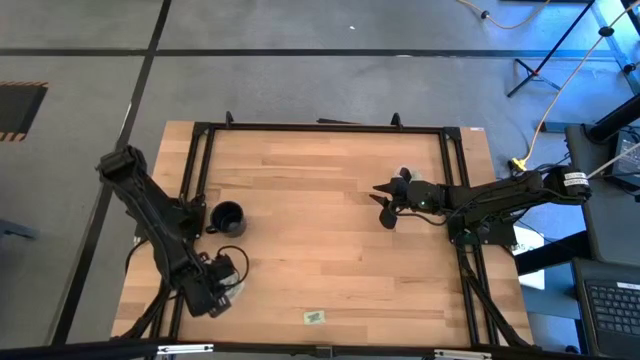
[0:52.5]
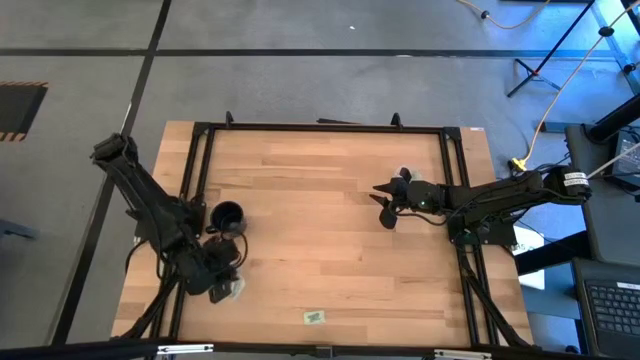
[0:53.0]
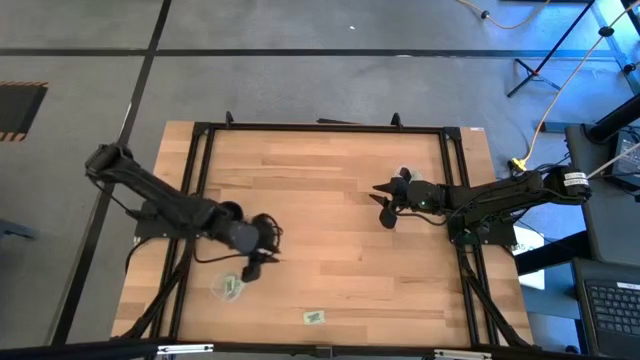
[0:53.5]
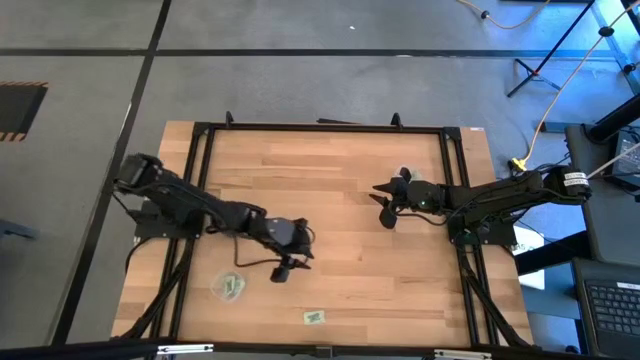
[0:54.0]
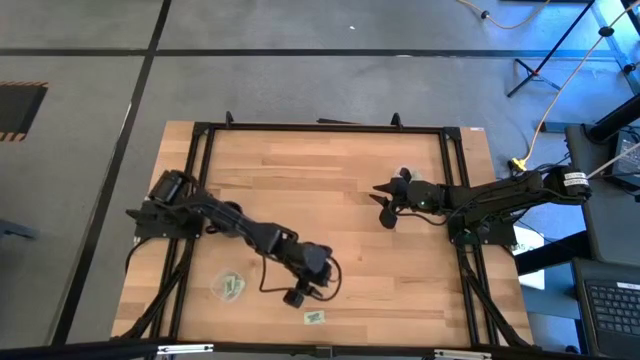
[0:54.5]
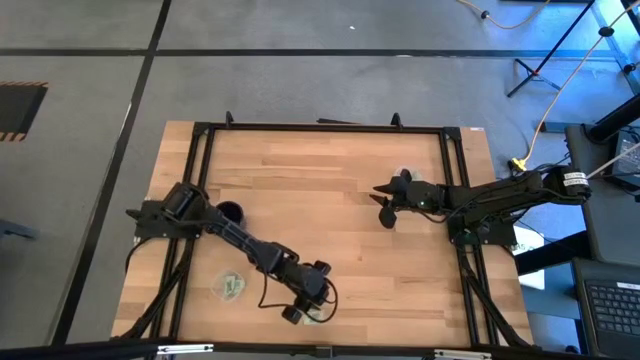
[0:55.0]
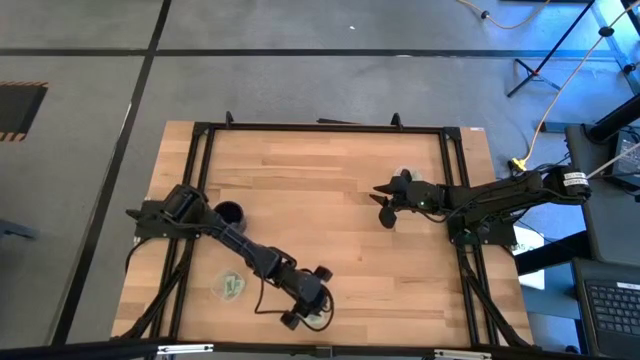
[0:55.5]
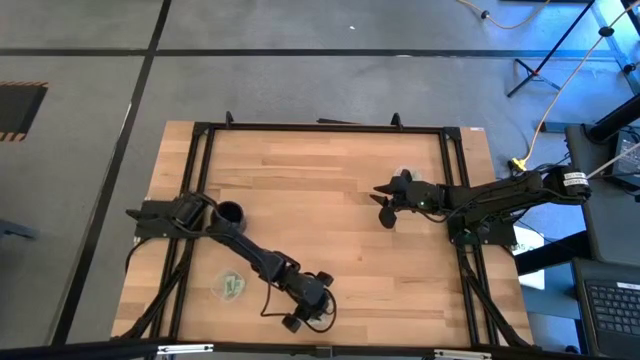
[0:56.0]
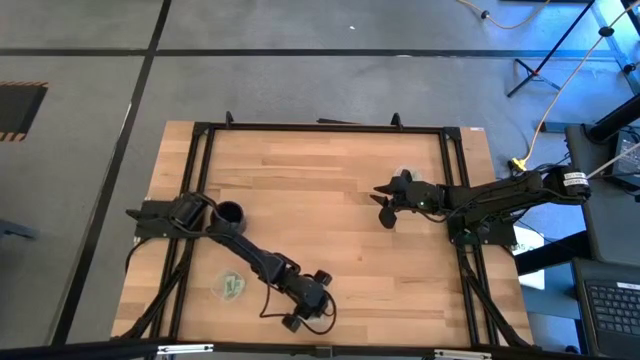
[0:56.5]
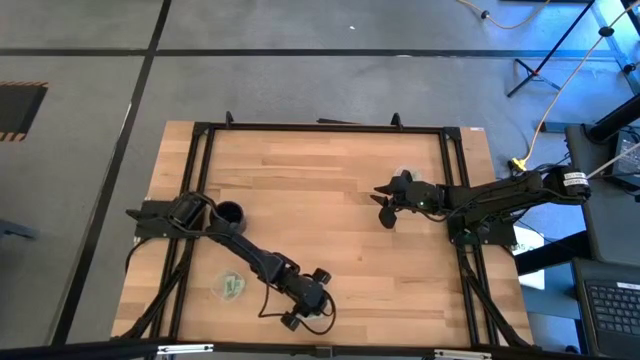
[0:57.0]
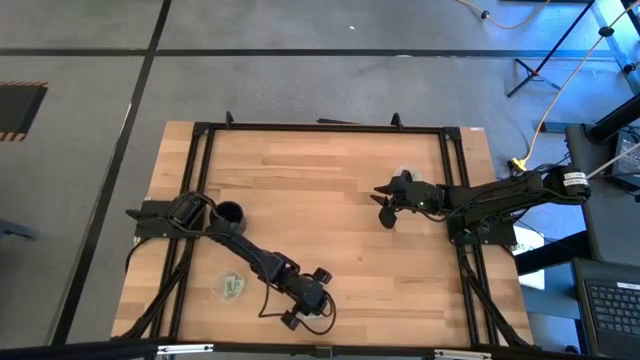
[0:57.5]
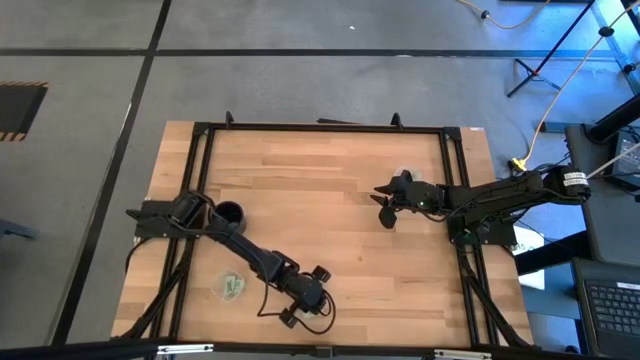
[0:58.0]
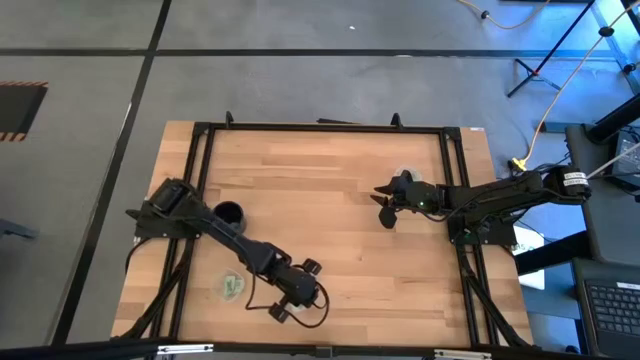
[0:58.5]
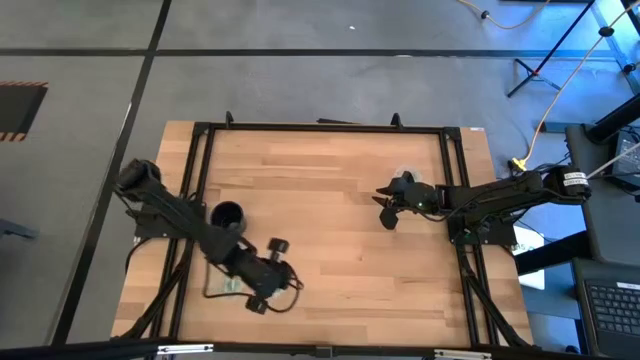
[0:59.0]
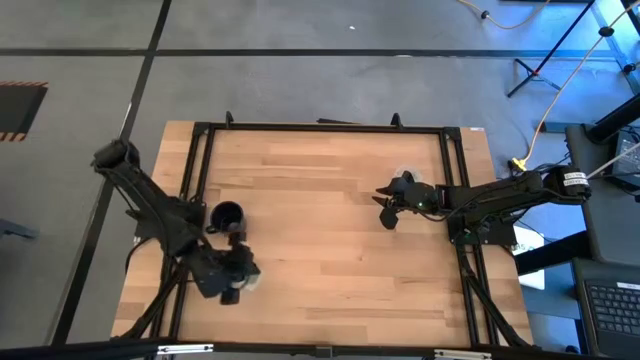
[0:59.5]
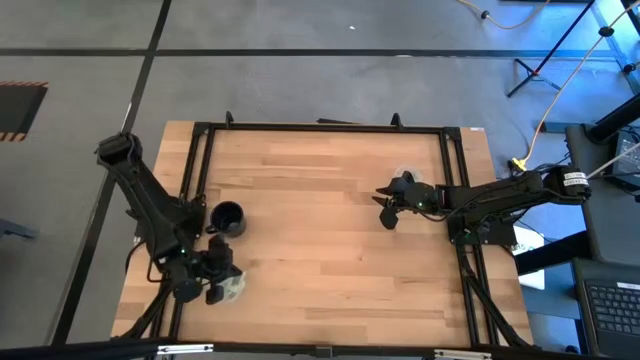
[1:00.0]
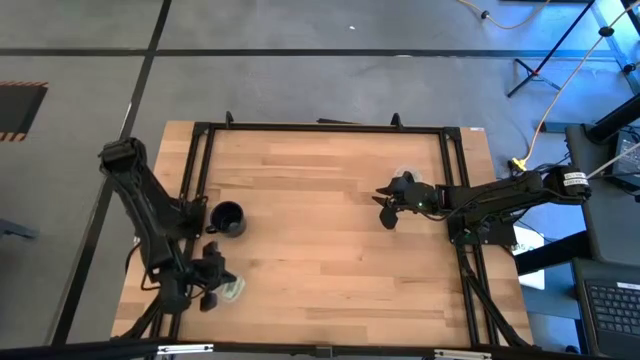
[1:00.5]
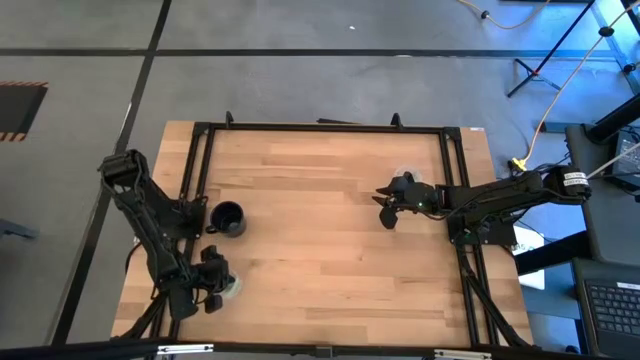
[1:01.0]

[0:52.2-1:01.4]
Task: Pick and place items into bin
Put the light green stevia packet into the bottom transparent bin

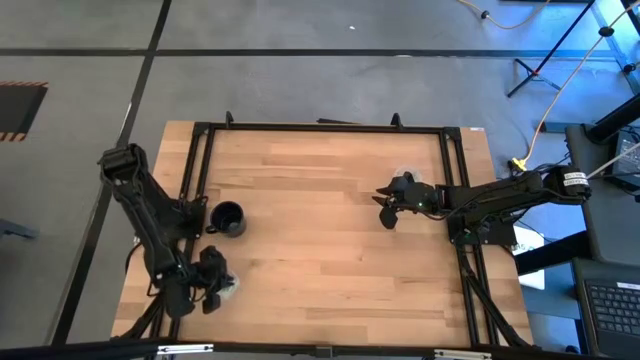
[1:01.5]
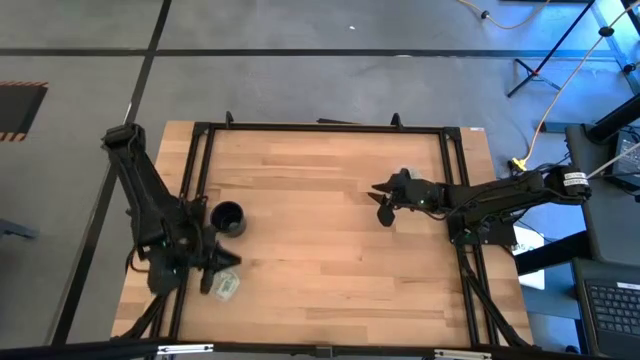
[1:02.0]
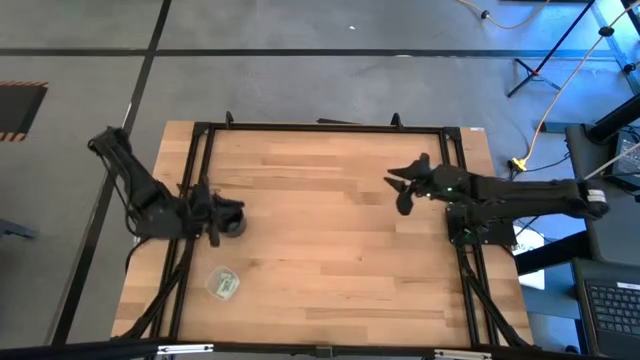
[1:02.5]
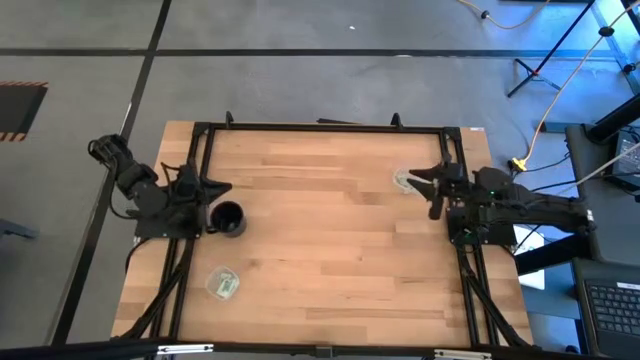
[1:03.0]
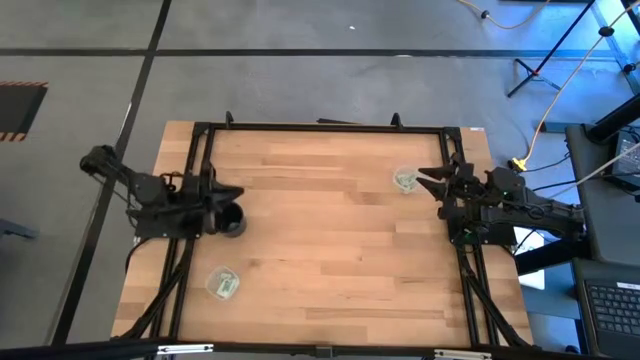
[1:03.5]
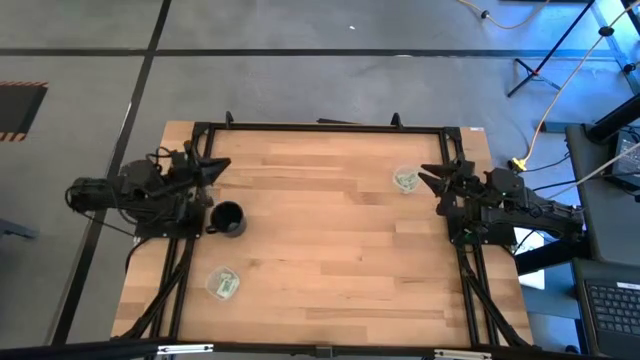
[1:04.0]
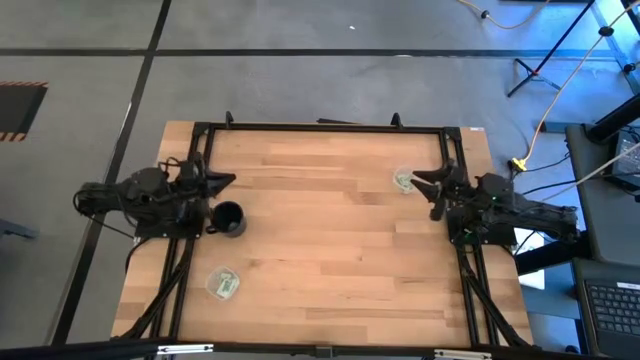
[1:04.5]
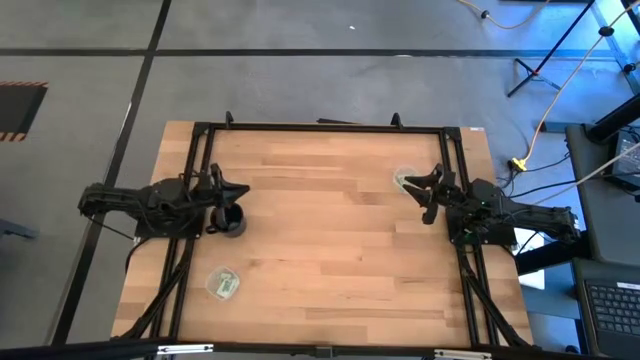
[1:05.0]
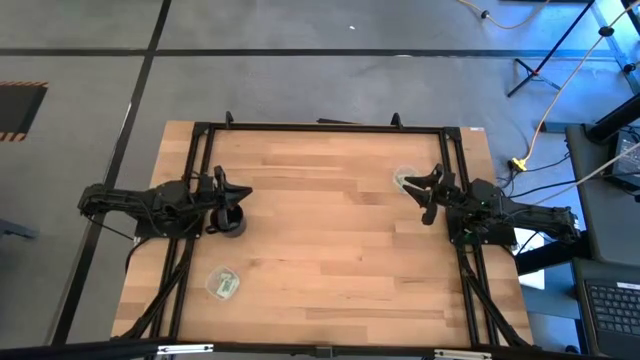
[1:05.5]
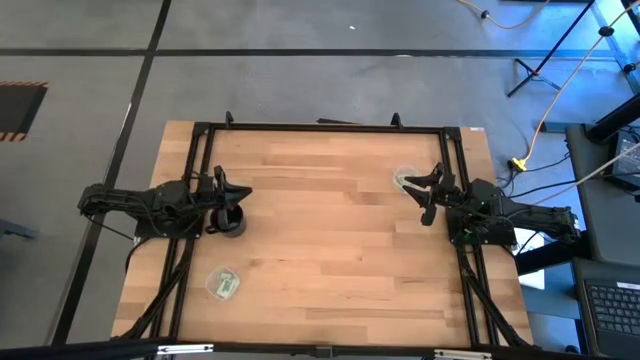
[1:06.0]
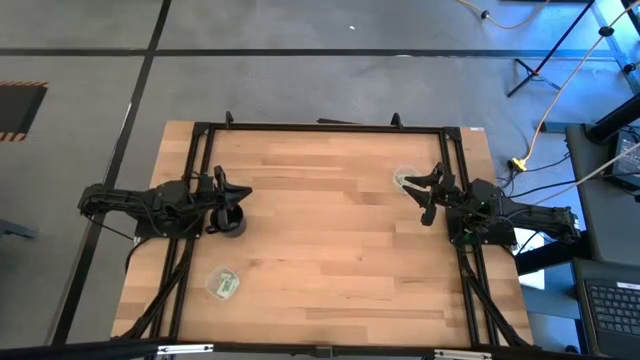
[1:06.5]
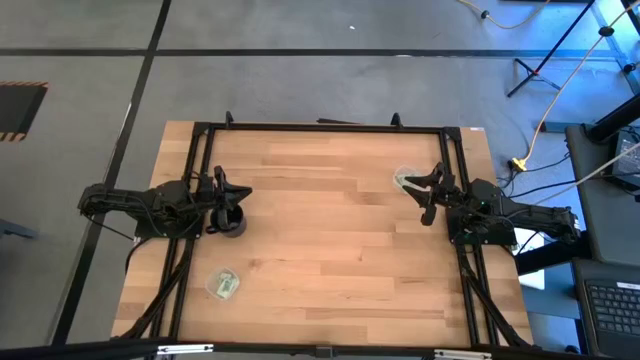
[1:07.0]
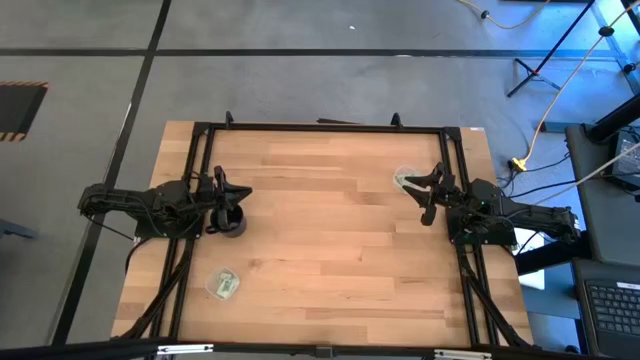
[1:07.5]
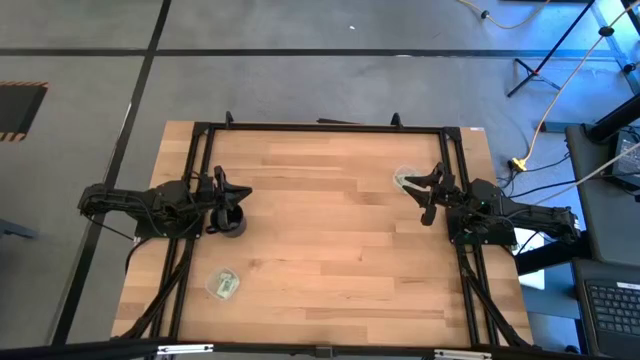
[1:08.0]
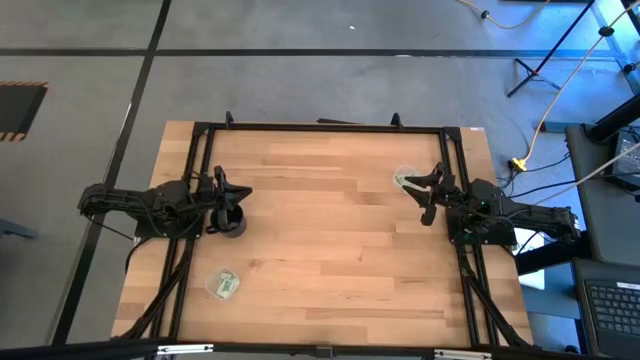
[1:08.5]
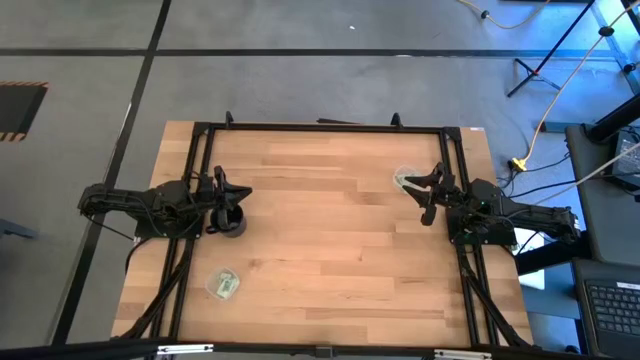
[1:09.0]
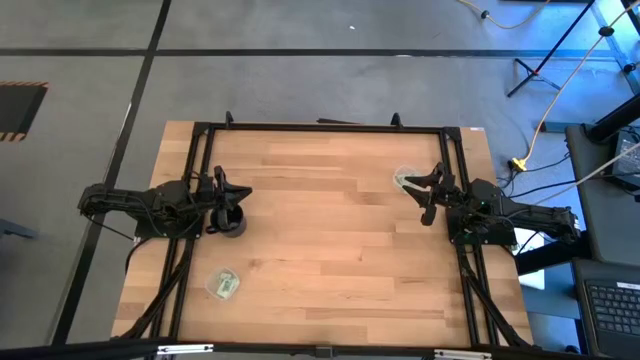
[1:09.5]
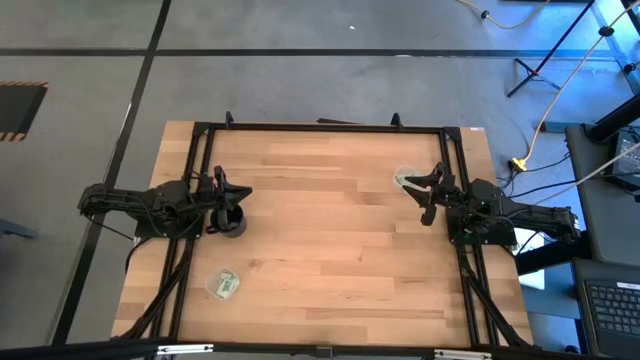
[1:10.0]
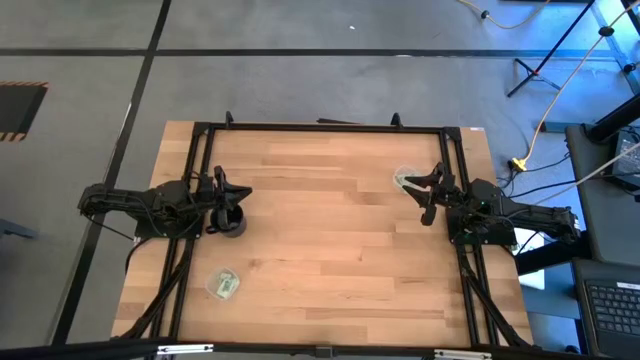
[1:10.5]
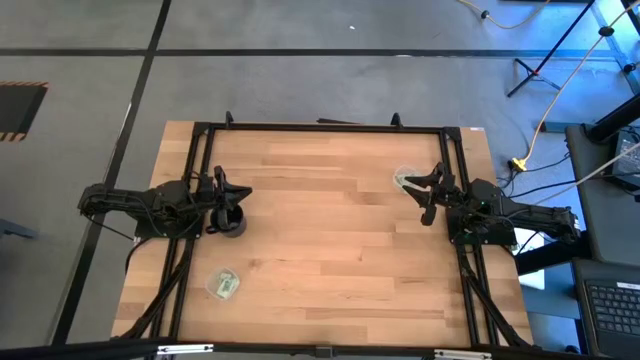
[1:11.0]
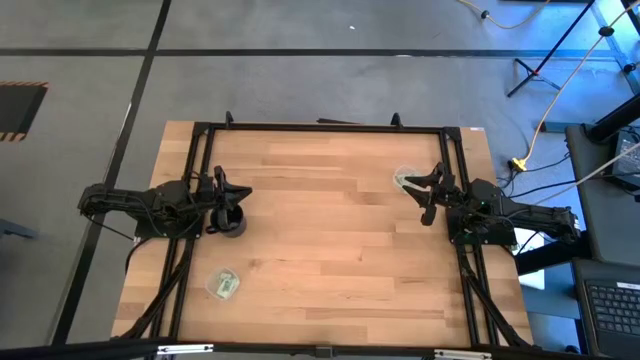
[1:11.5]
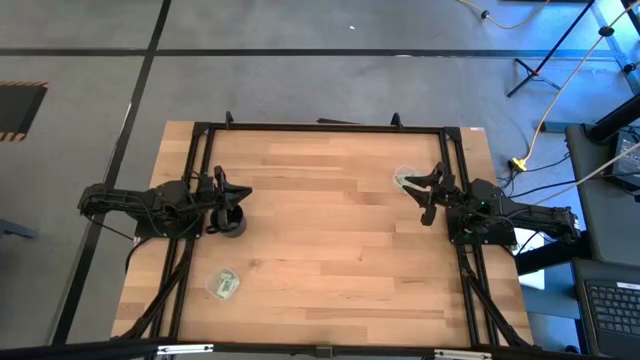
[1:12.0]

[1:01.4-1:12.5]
Return to Home Position

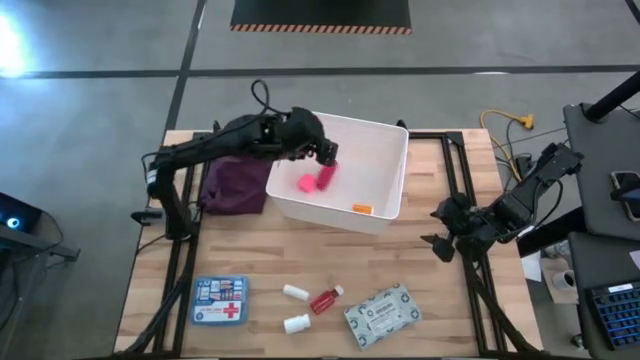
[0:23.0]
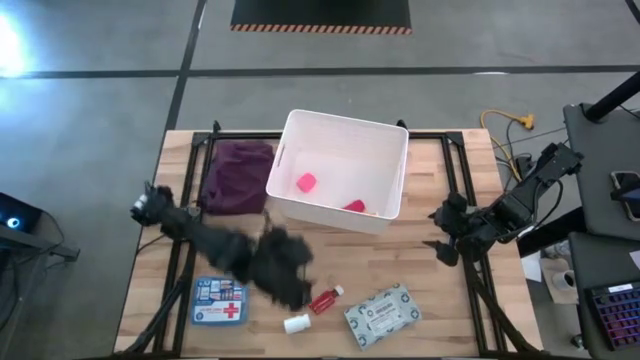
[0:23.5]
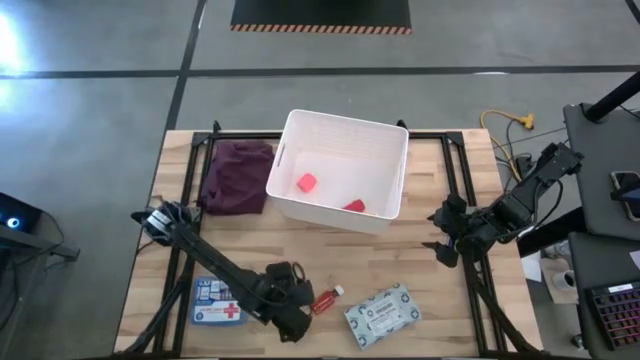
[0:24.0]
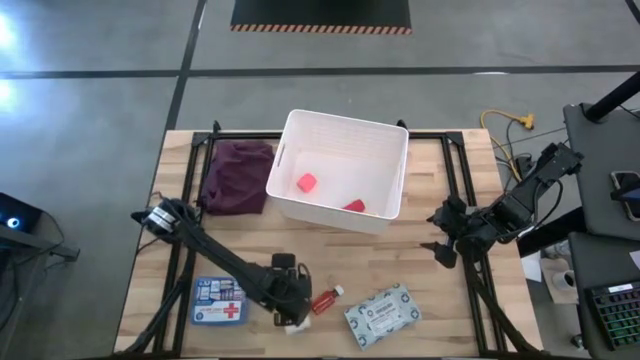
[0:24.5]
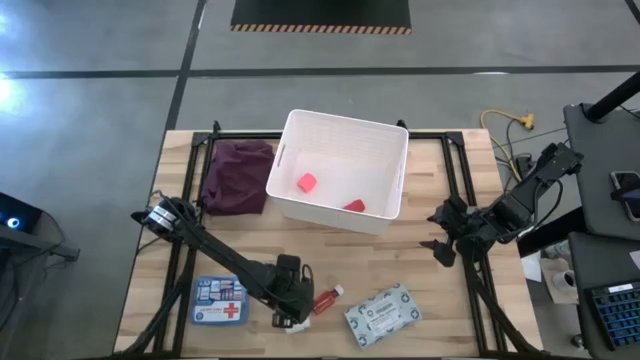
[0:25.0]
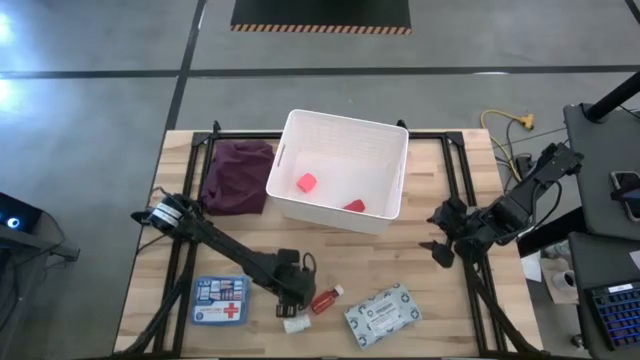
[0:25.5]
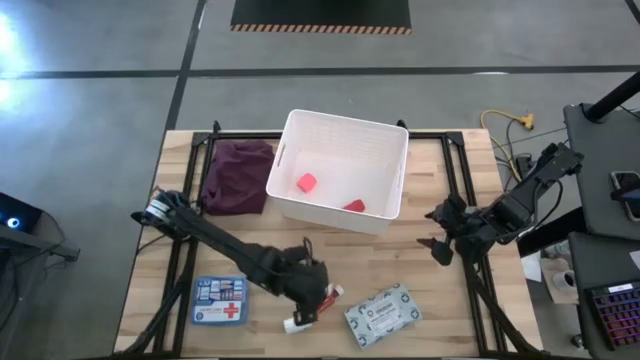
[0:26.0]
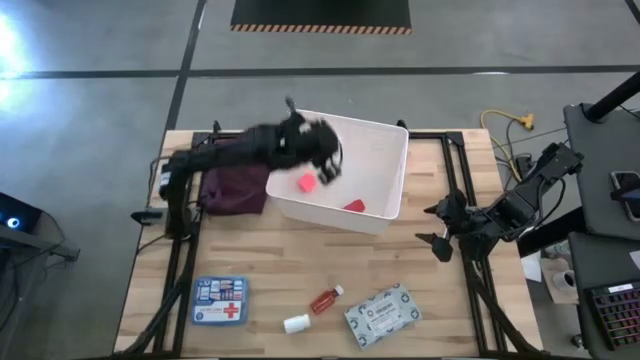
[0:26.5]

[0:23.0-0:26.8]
Task: Pick & place medical supplies in basket/bin
Put the white rolled gauze into the white bin
